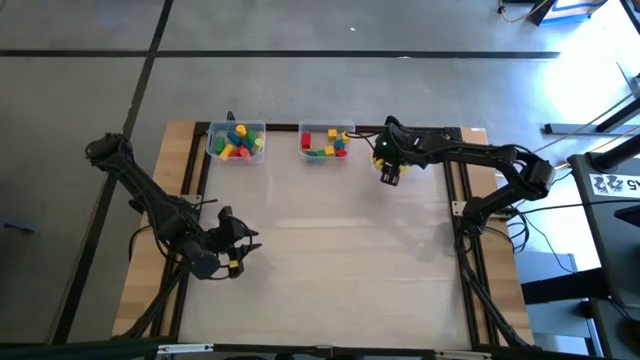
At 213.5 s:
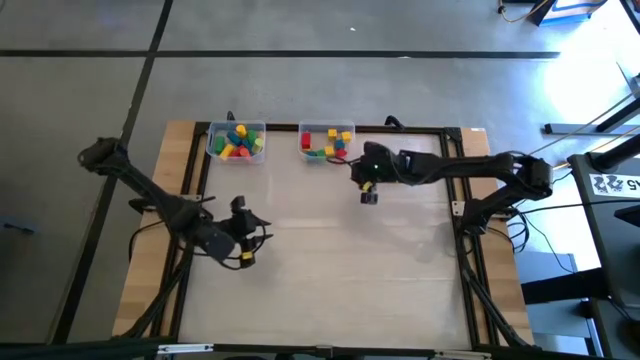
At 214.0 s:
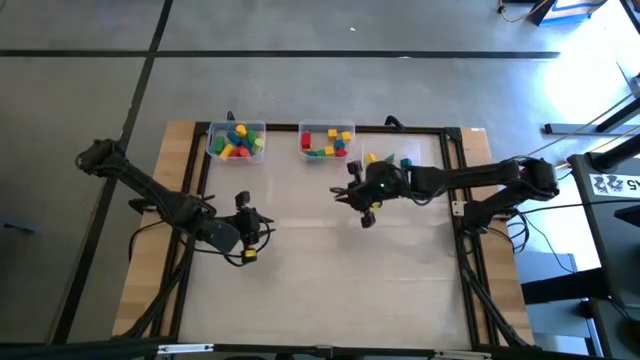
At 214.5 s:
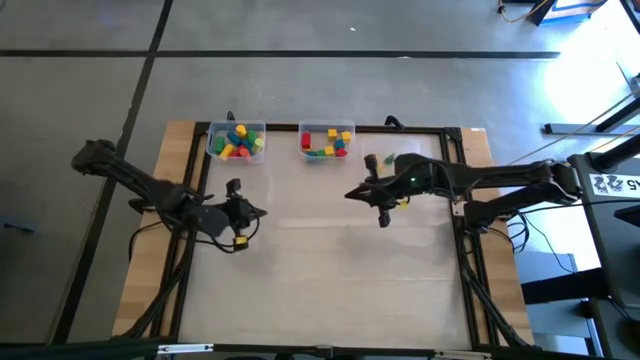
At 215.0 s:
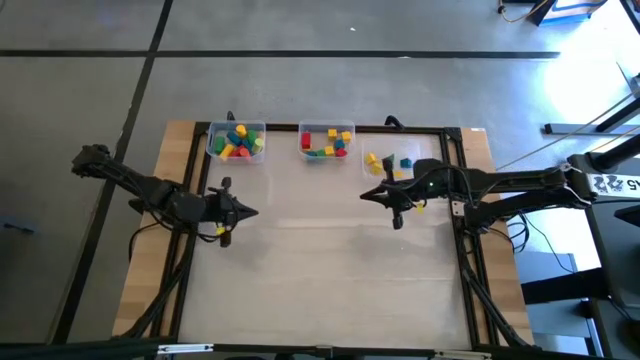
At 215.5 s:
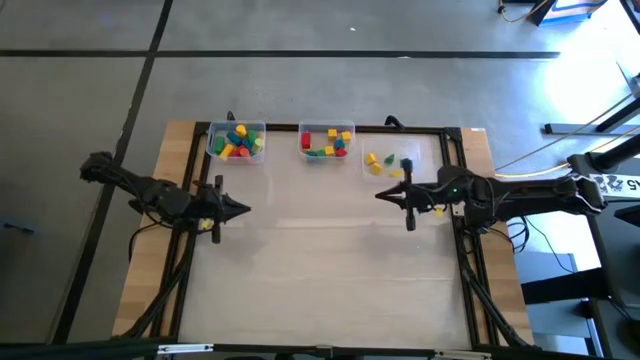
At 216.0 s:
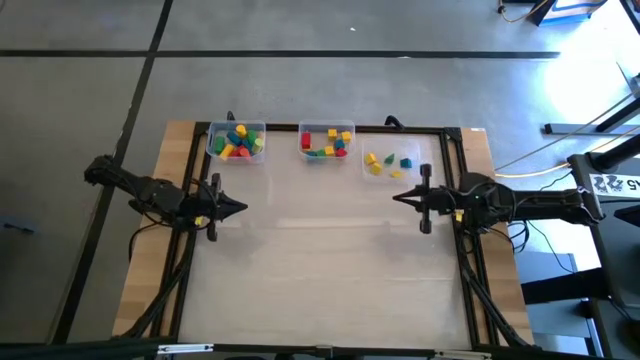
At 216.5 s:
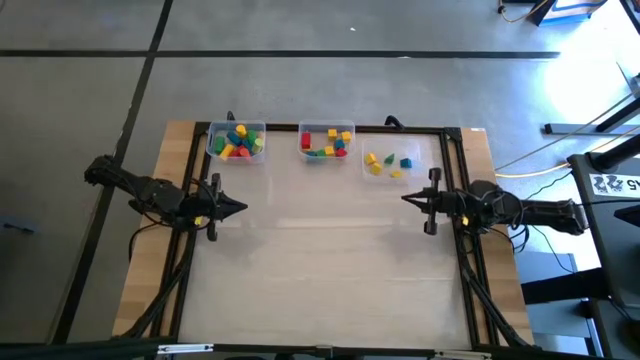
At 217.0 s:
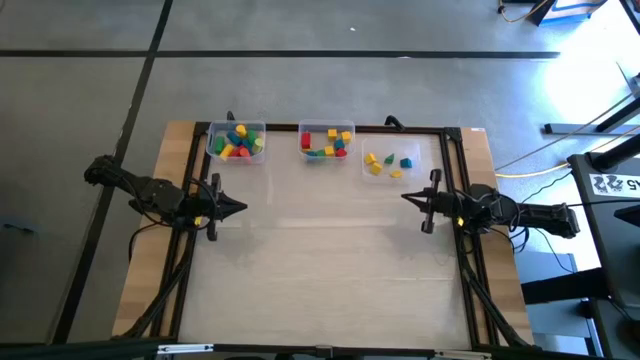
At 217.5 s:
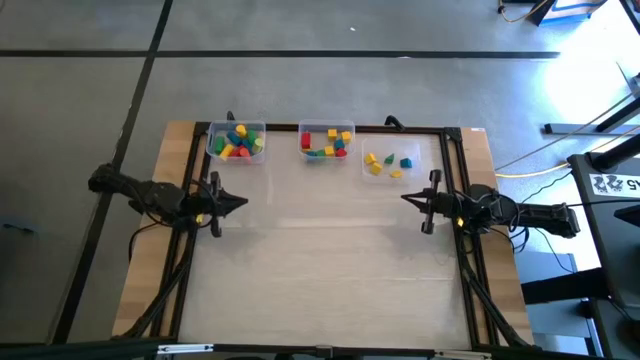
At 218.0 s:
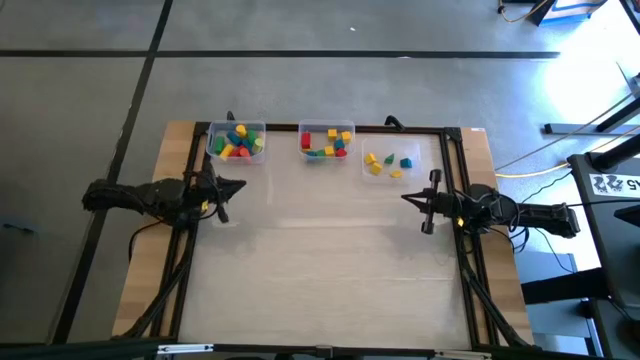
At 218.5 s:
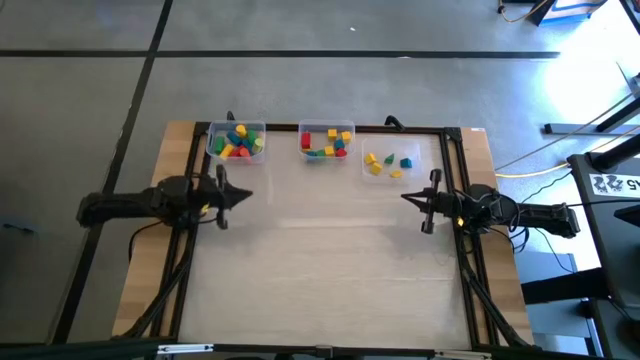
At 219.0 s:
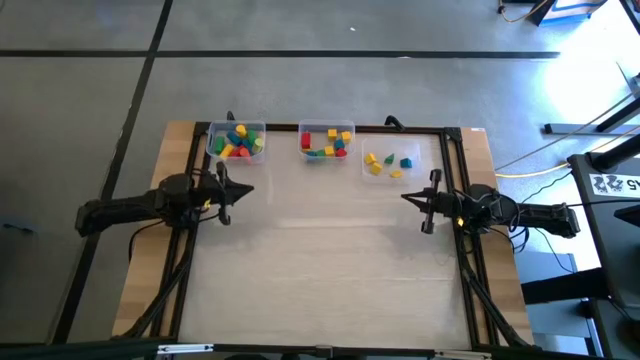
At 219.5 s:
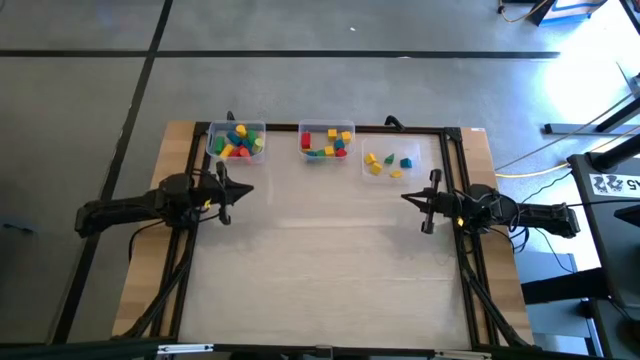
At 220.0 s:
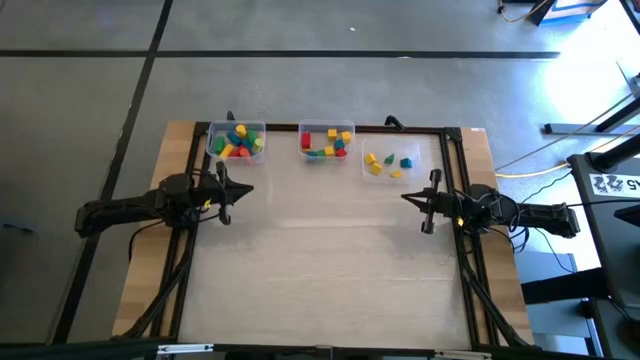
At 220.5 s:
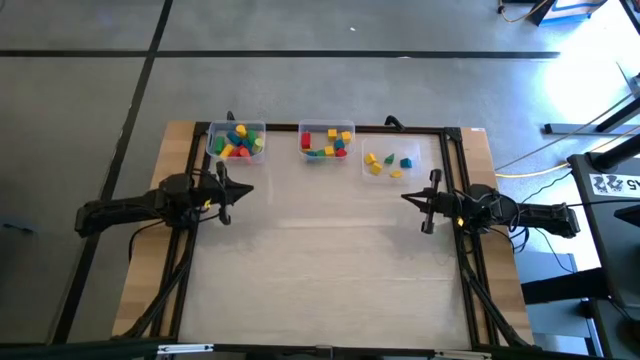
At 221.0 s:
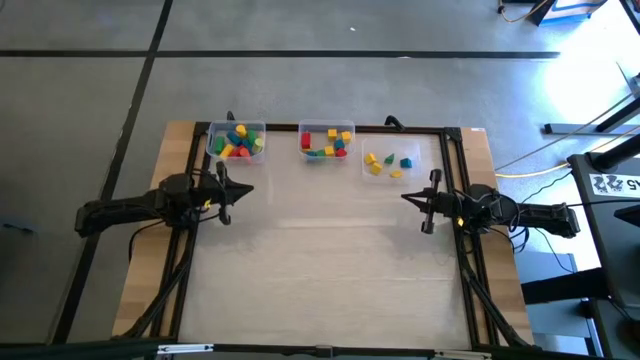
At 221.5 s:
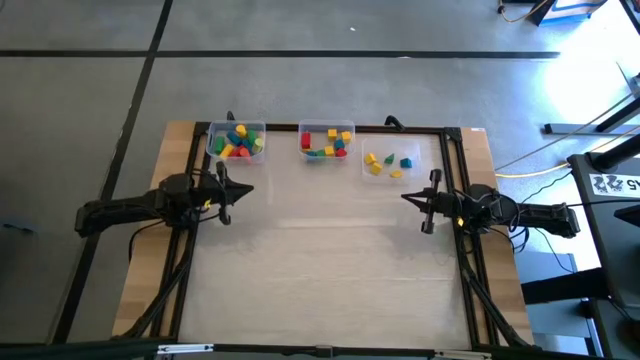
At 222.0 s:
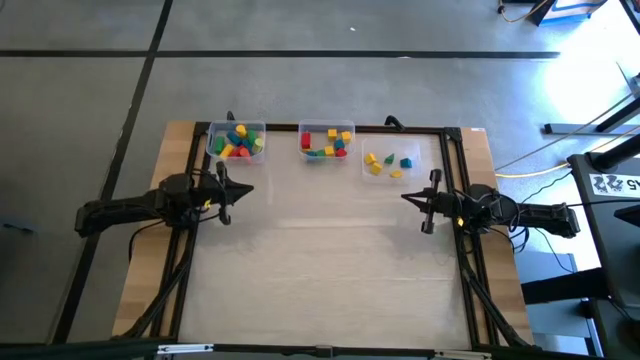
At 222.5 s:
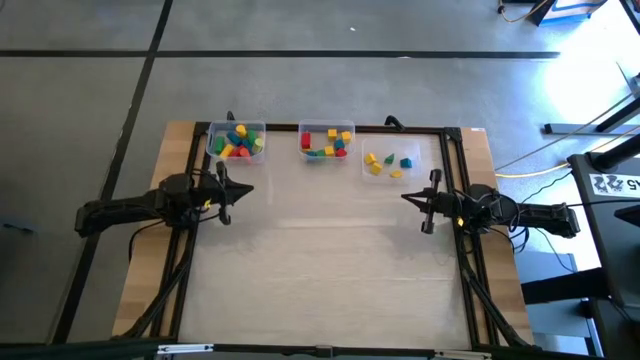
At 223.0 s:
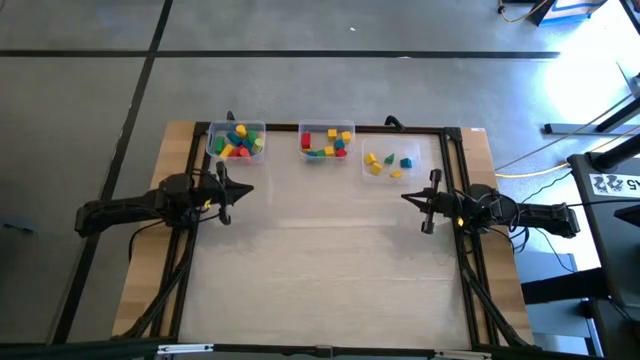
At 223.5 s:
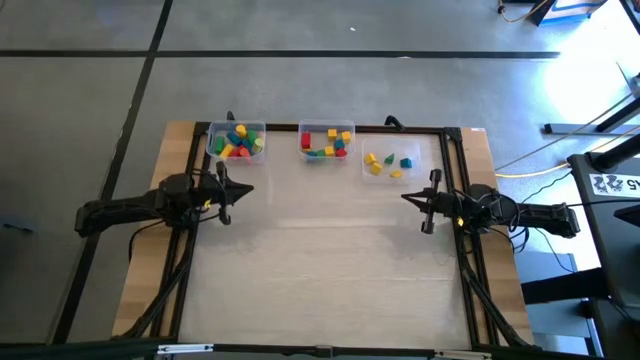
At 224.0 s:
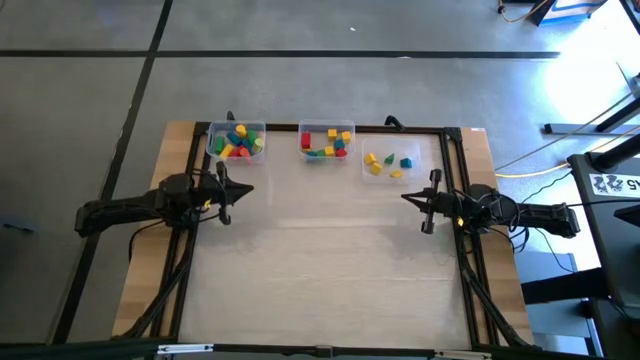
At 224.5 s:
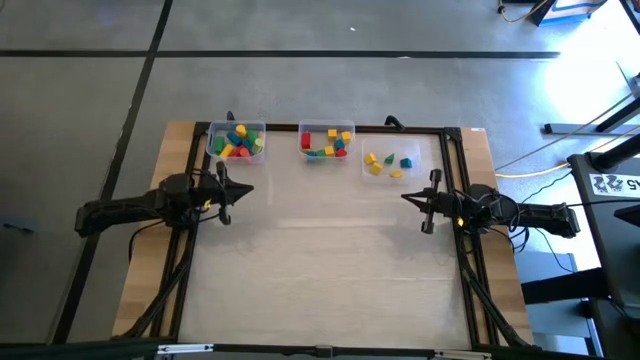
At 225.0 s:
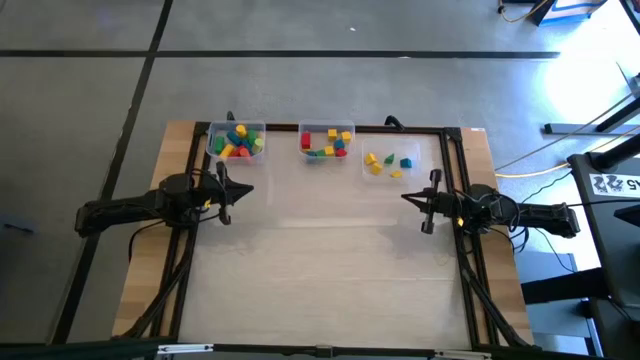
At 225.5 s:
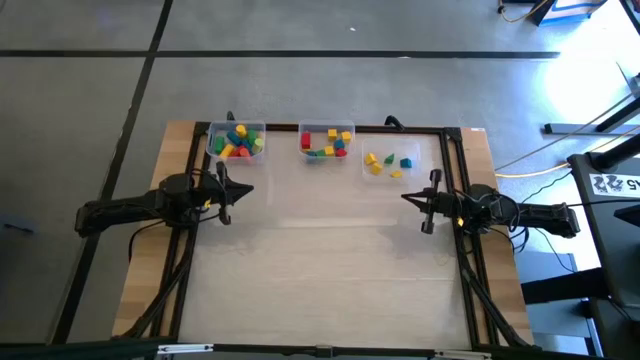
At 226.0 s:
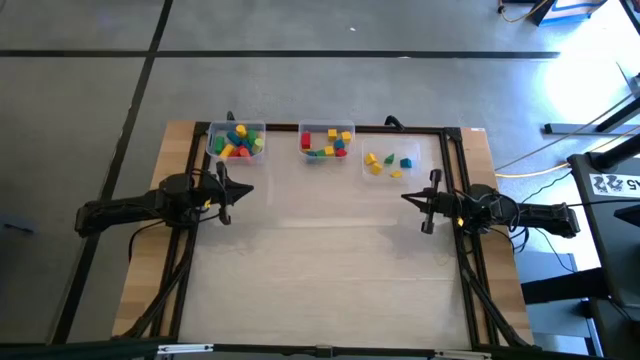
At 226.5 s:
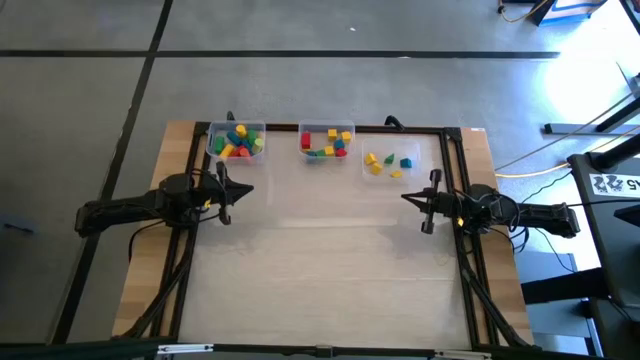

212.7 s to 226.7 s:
Task: Sort blocks by size
Return to Home Position

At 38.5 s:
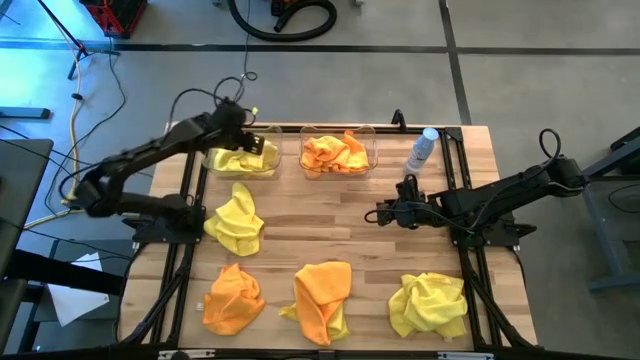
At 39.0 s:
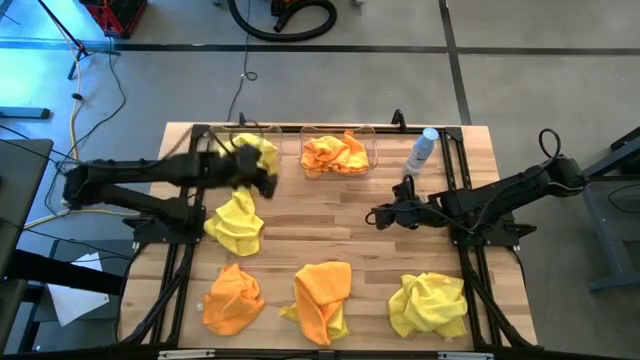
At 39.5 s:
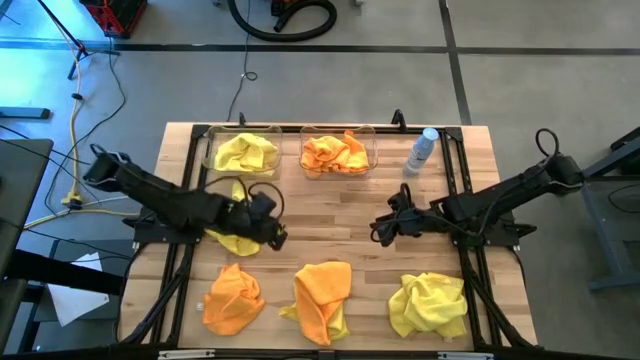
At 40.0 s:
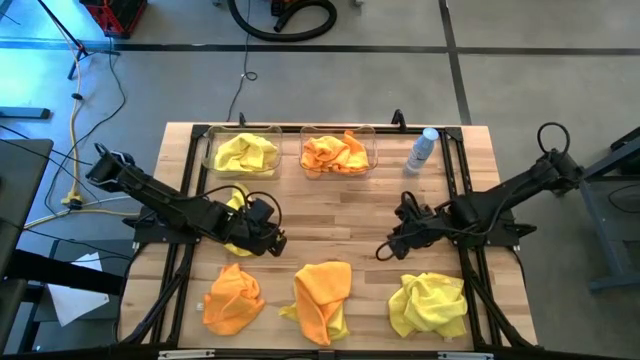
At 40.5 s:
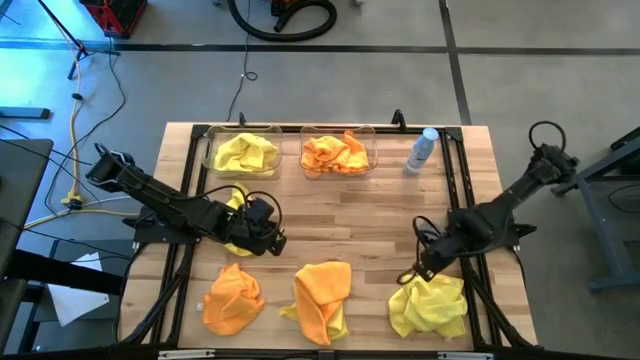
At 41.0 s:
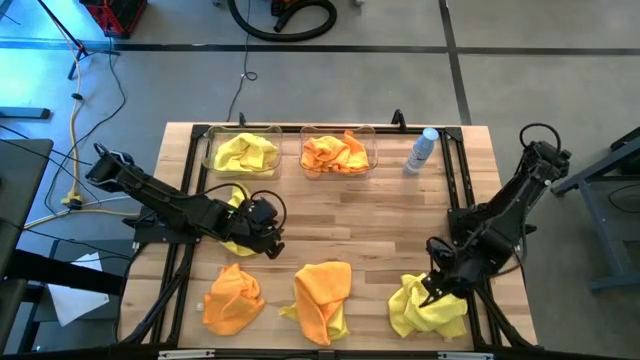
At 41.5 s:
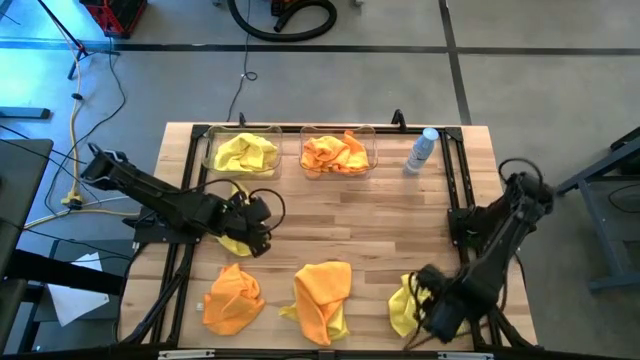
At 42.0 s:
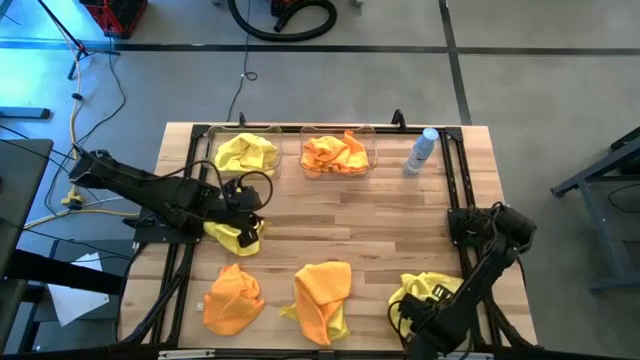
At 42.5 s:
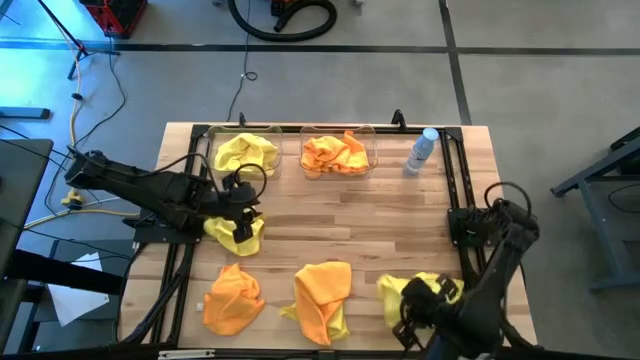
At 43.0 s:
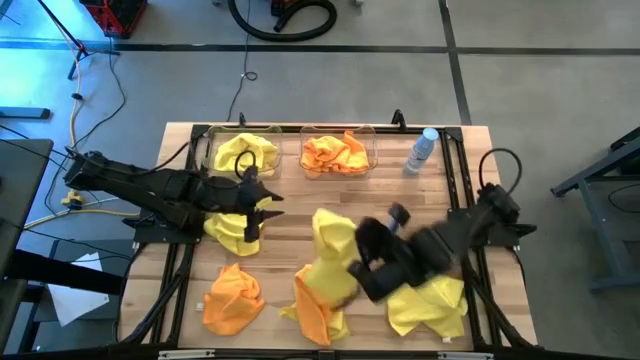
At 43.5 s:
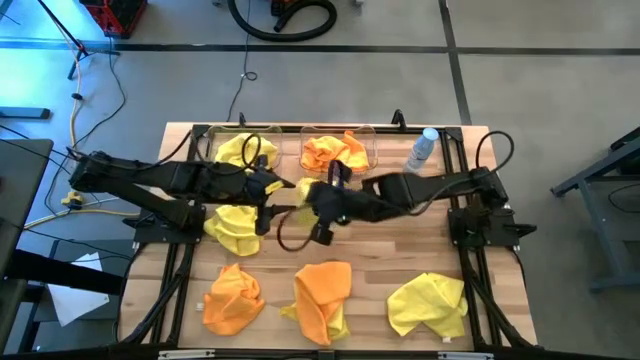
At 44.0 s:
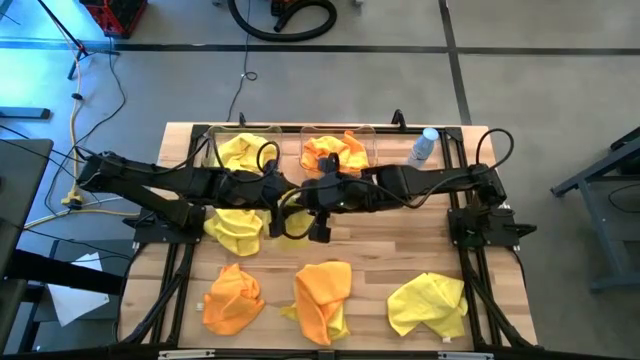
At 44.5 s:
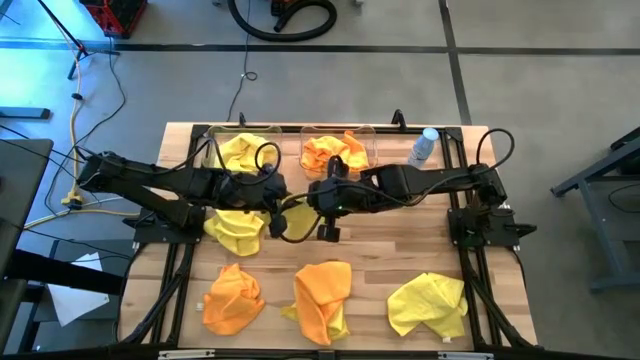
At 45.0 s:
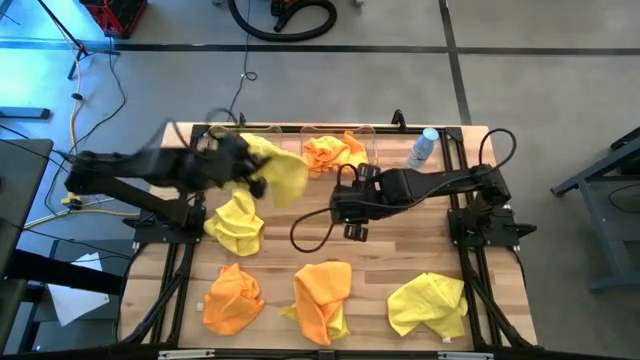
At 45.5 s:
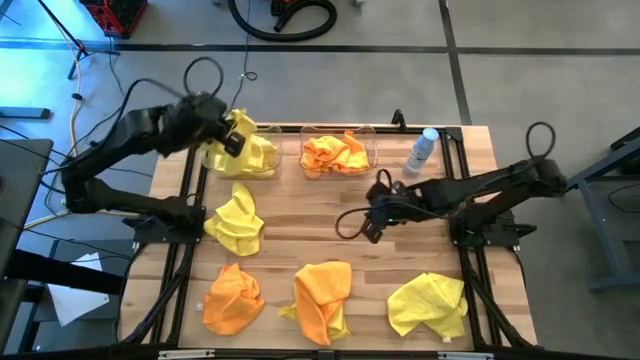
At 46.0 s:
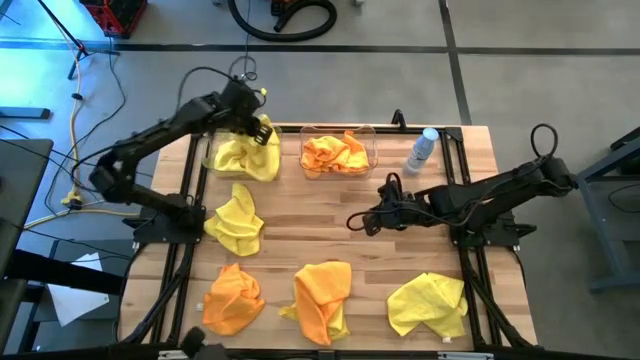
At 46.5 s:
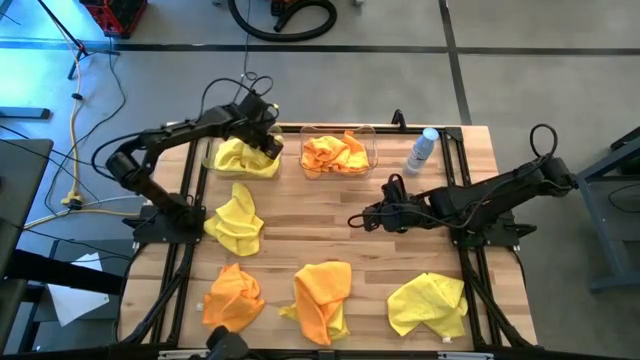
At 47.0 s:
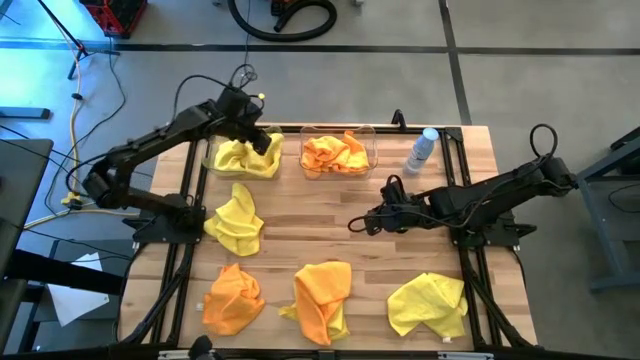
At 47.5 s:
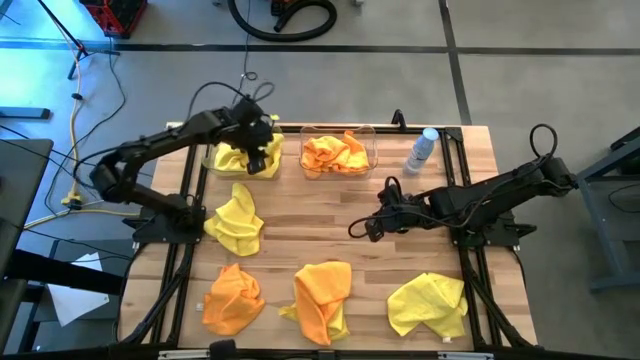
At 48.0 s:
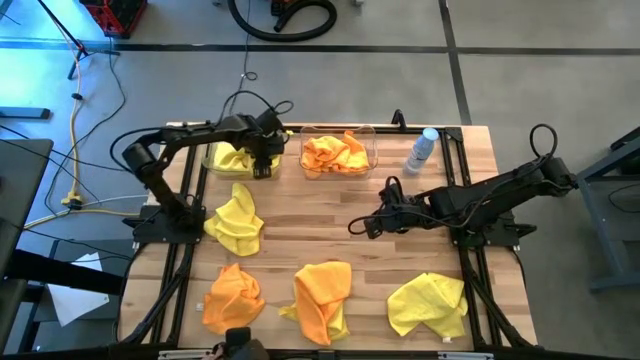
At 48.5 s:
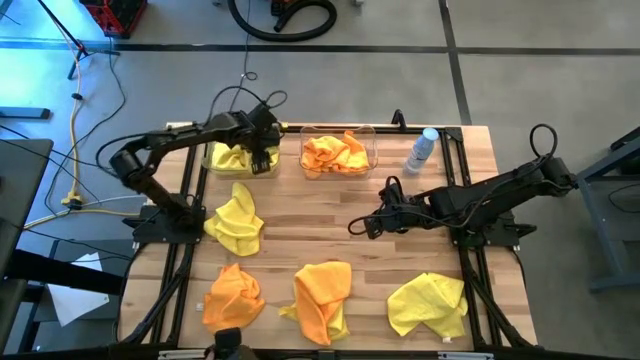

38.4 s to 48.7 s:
Task: Sort microfiber towel by color & place in baskets
Put the yellow microfiber towel into the left transparent bin
